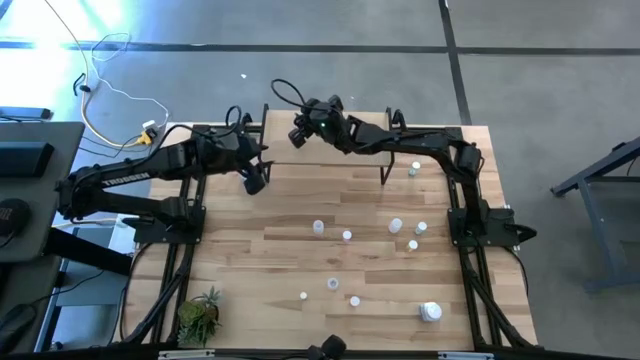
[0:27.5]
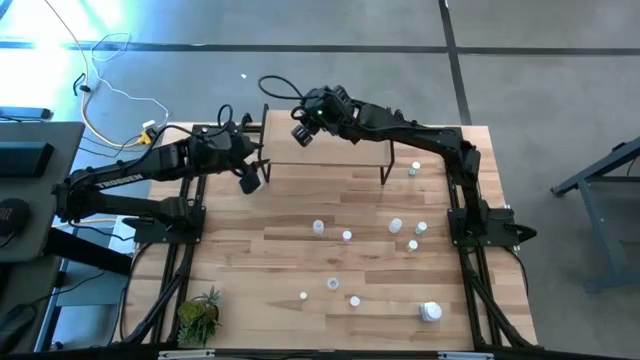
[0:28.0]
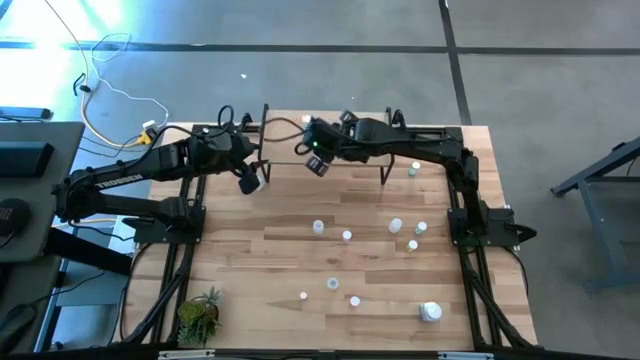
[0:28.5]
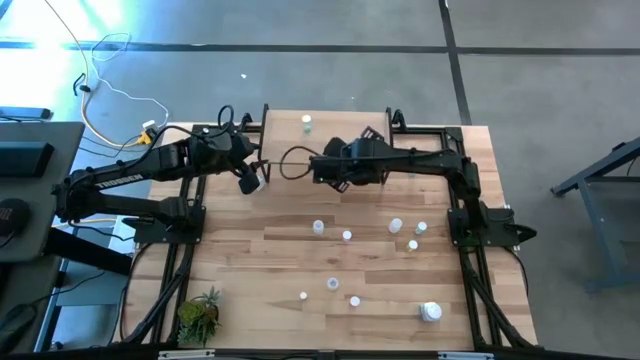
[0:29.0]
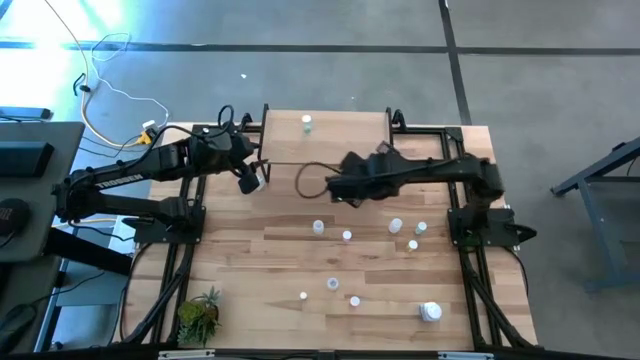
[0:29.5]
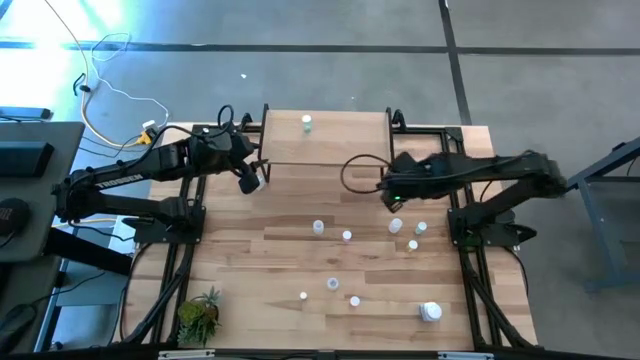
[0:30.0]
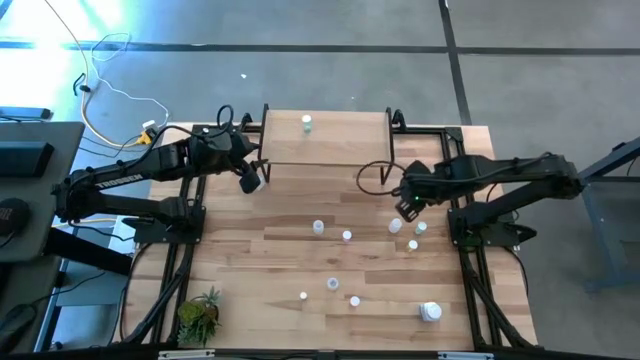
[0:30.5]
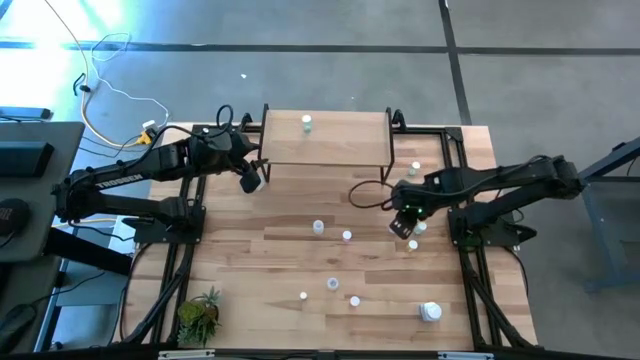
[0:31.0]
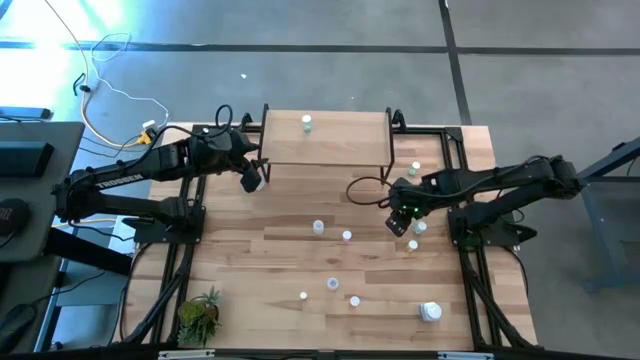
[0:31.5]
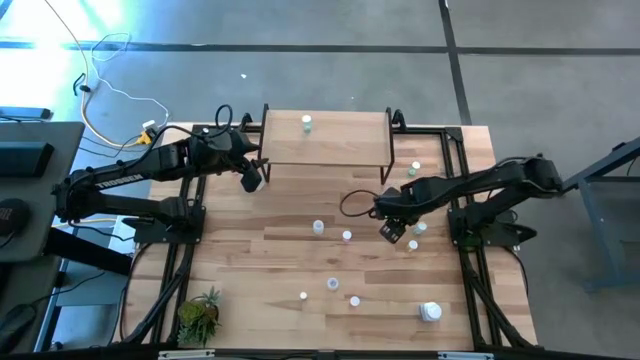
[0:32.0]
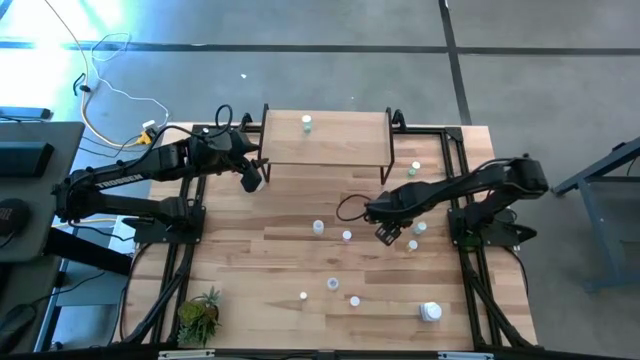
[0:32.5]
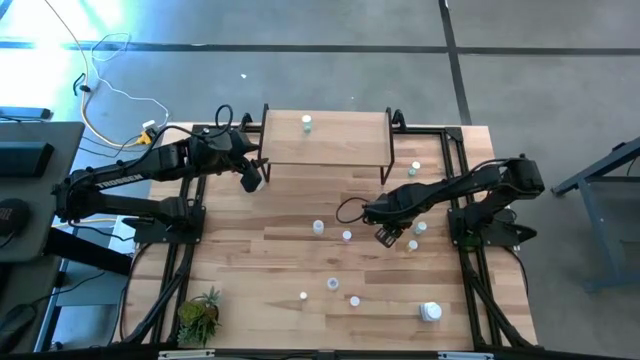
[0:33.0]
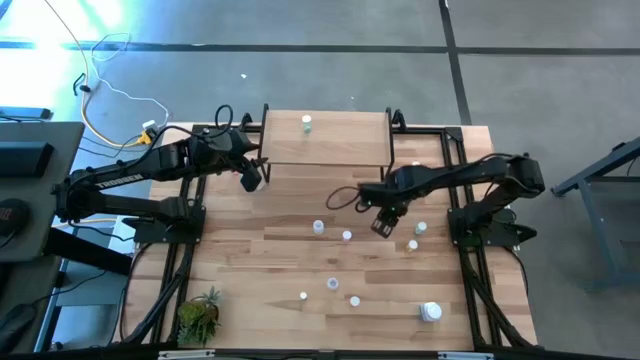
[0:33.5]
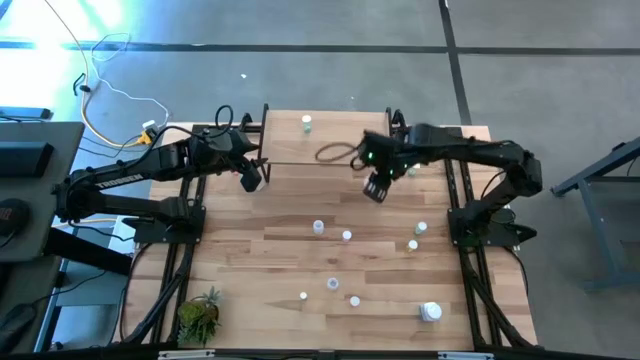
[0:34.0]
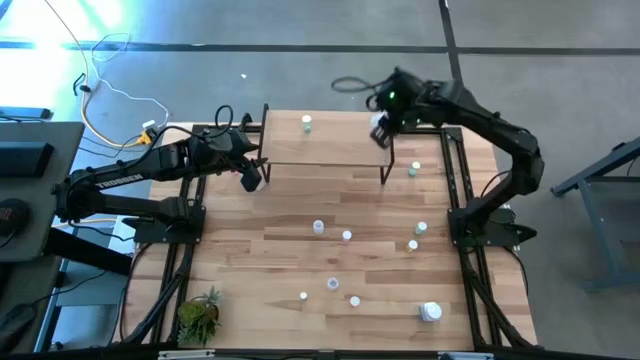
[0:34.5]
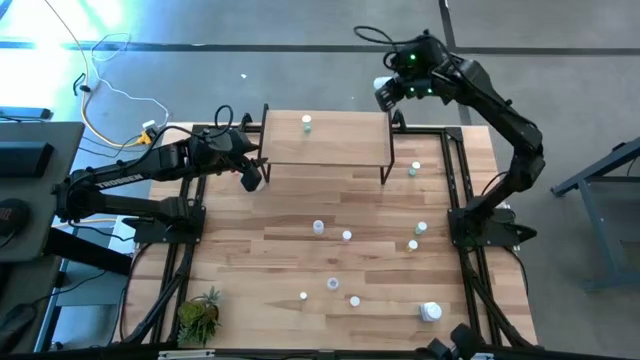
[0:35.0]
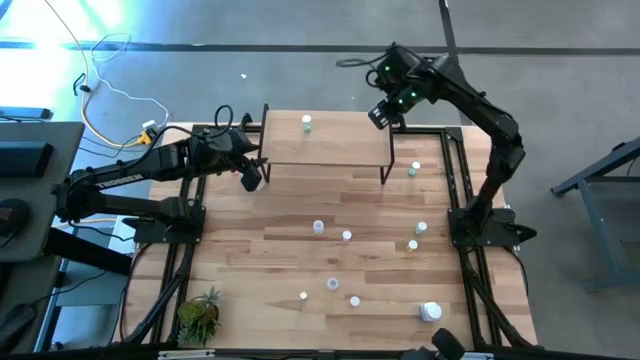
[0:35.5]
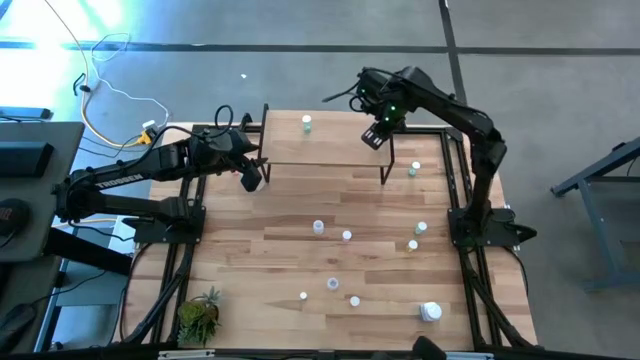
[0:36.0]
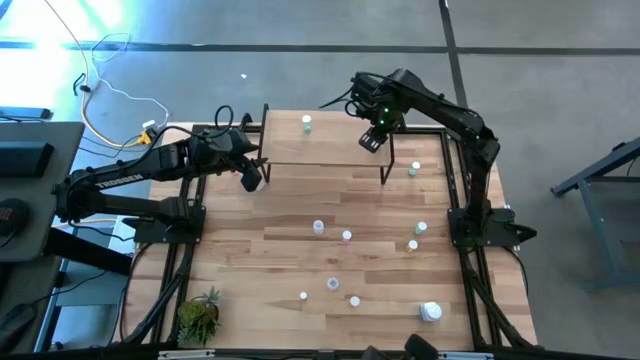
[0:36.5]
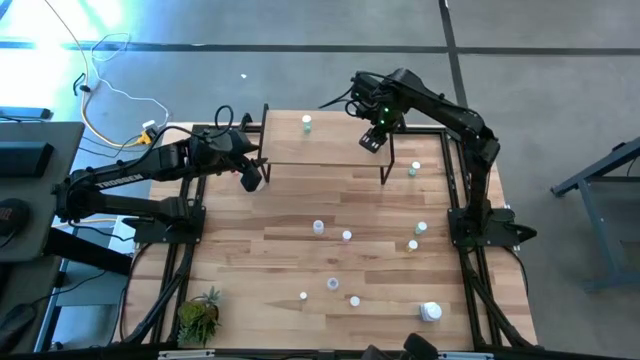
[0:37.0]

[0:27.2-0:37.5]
Task: Pick and place medicine bottles onto shelf by color
Put the white pill bottle on the shelf

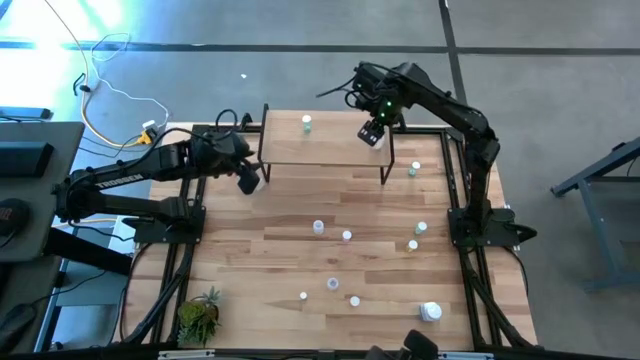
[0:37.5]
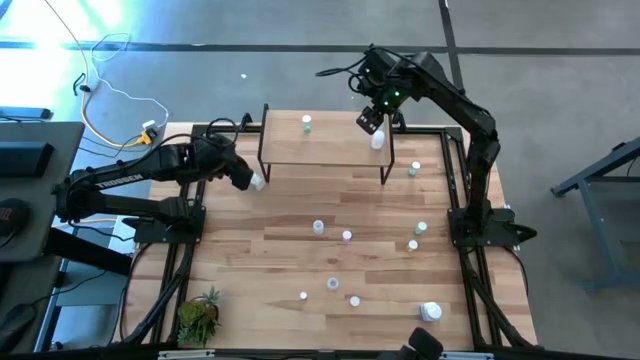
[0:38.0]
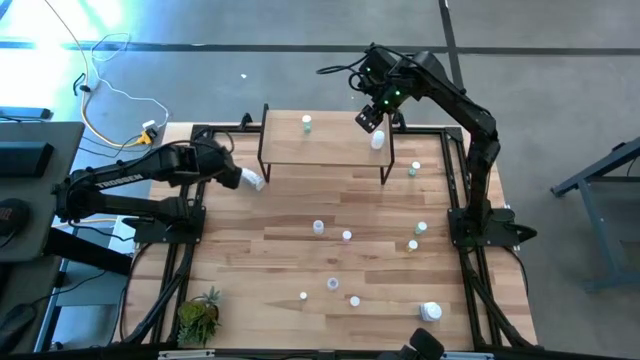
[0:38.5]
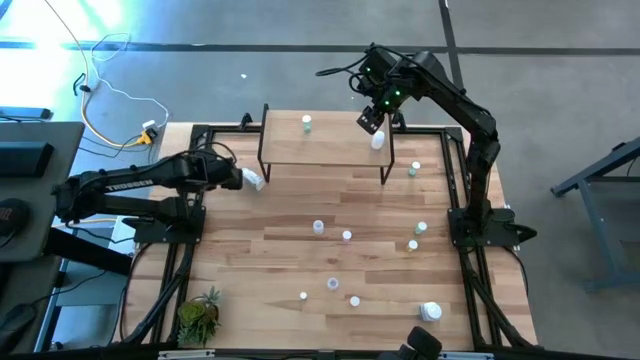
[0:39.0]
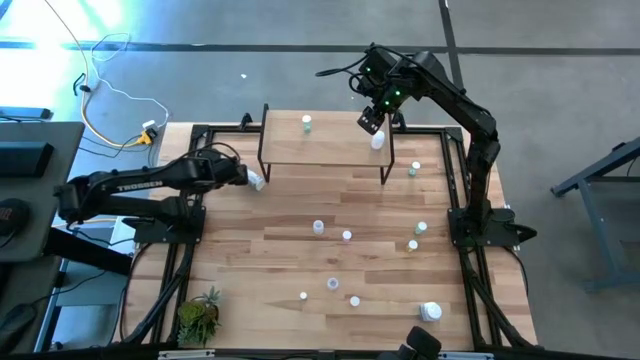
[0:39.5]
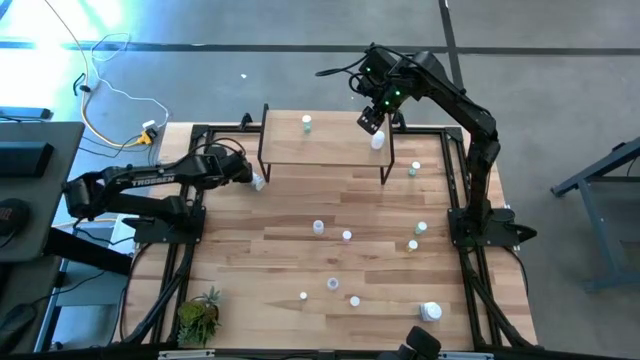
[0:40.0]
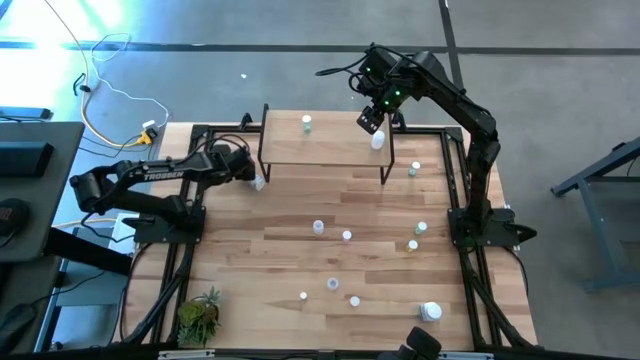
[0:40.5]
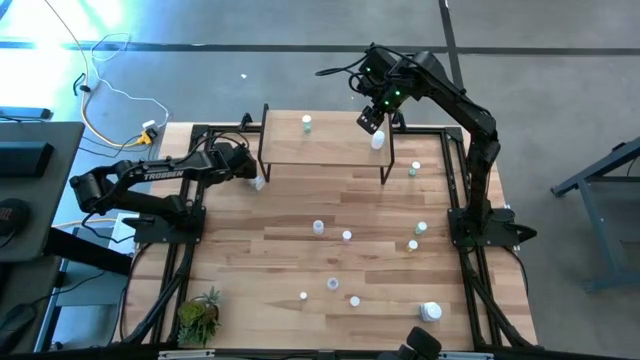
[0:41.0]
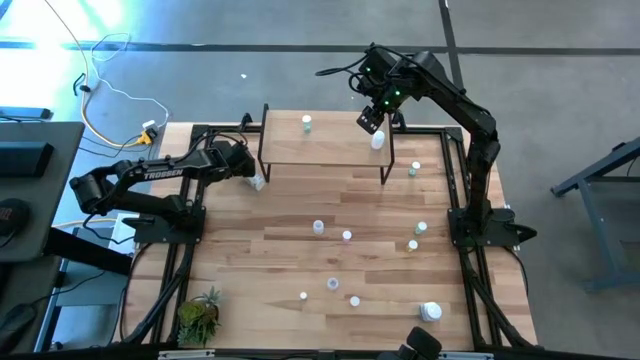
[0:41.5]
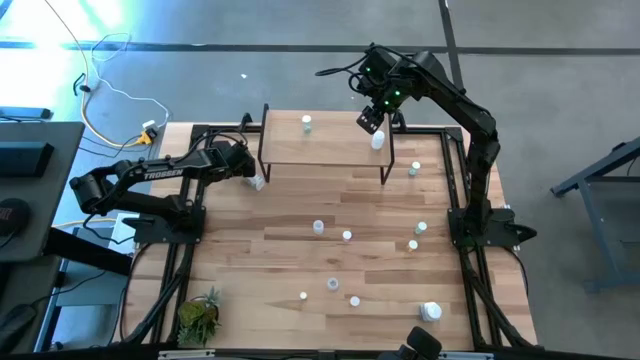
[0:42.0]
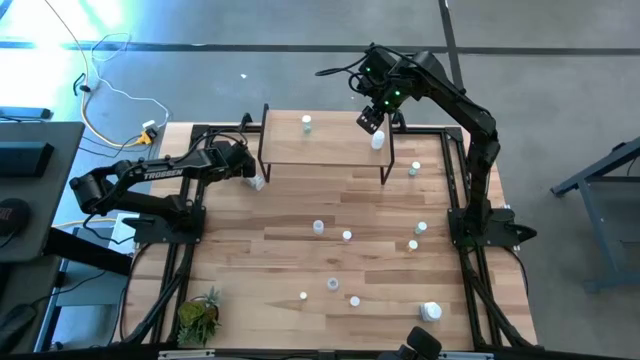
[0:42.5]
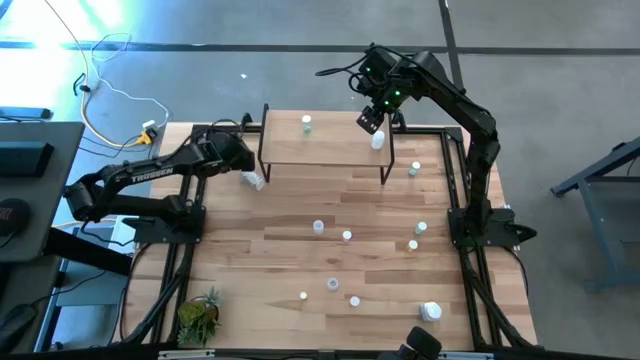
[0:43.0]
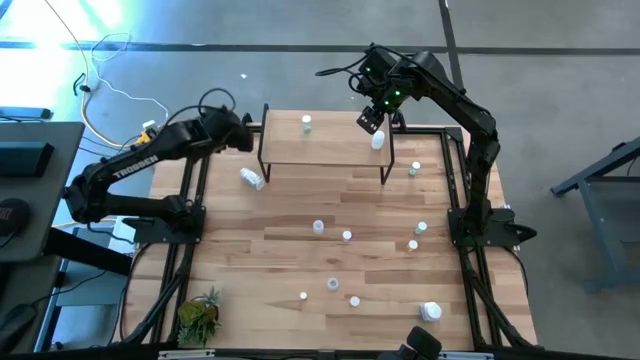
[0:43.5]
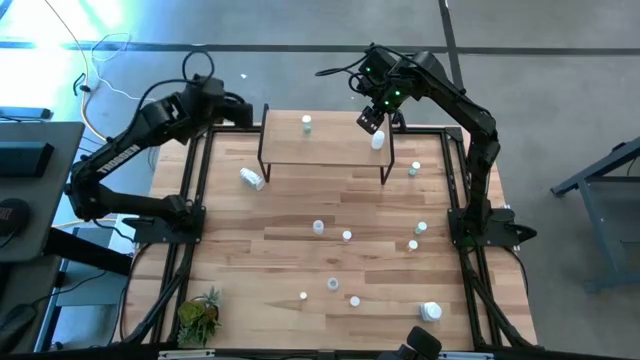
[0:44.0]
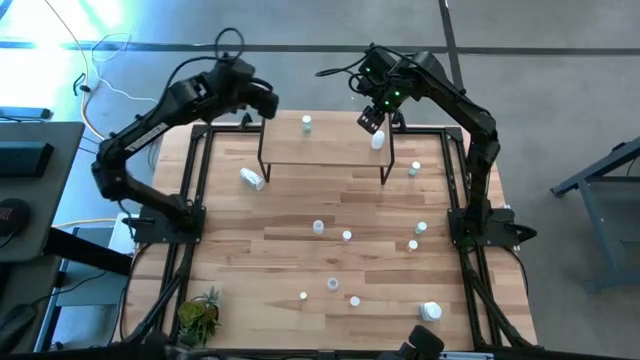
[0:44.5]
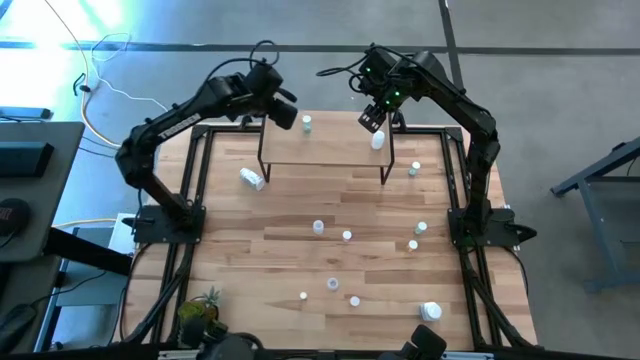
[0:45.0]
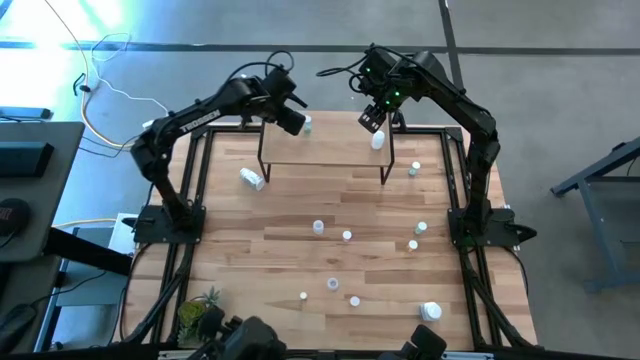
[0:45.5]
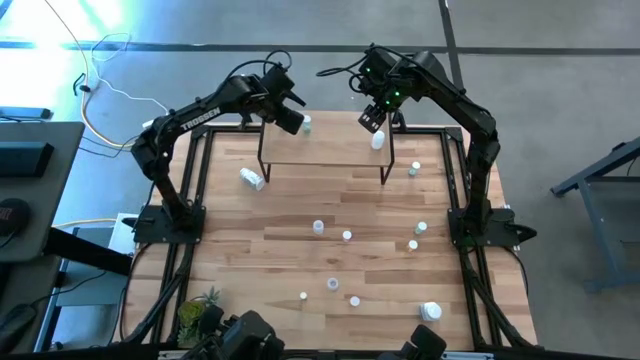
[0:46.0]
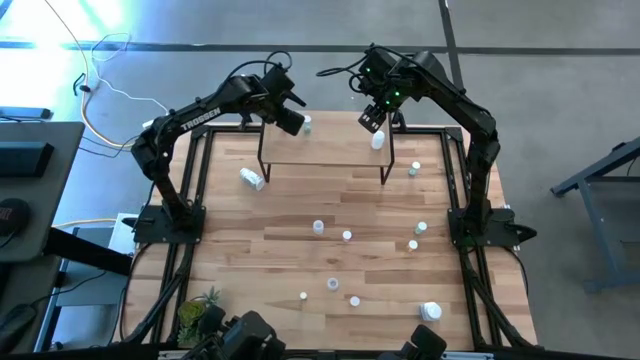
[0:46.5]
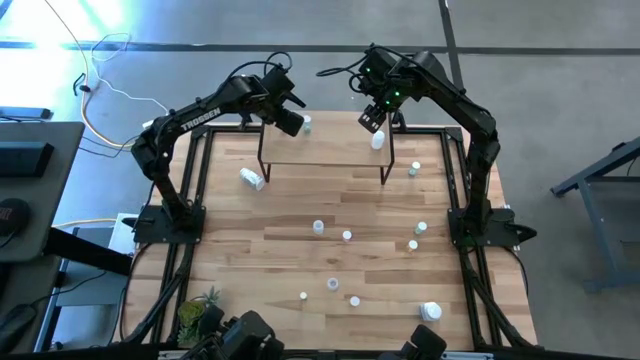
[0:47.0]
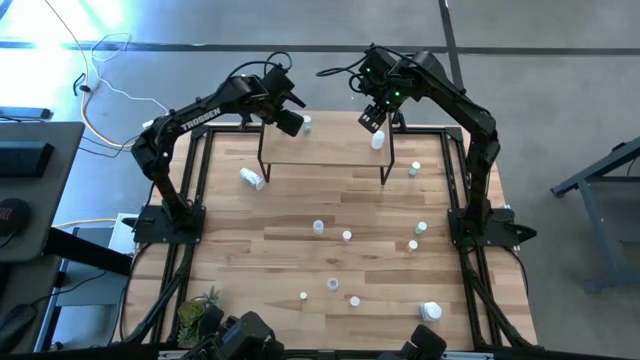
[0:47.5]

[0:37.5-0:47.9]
Put the orange pill bottle on the shelf
